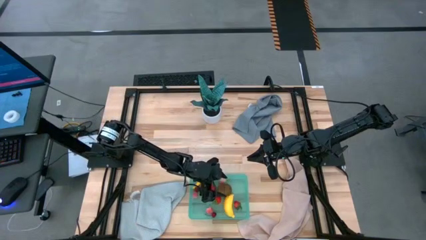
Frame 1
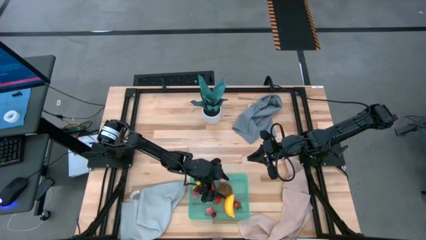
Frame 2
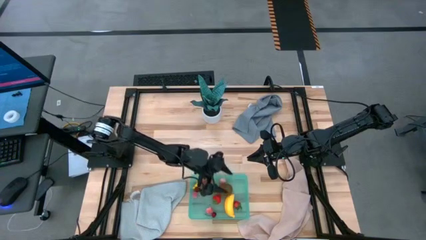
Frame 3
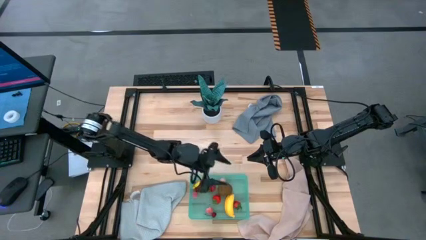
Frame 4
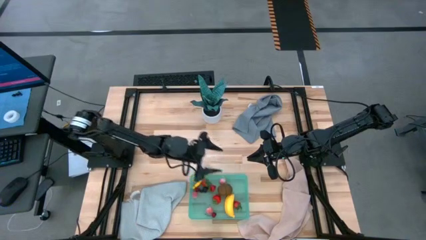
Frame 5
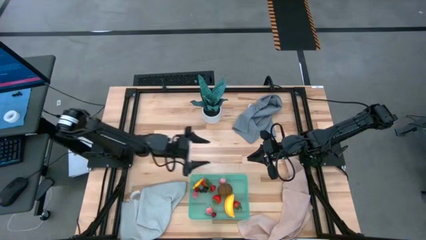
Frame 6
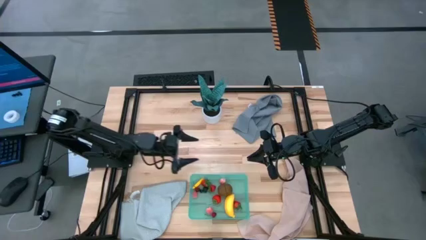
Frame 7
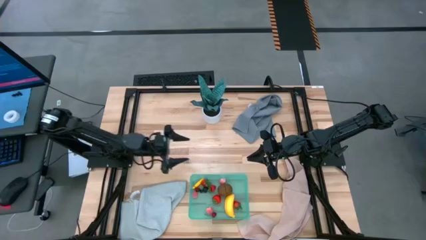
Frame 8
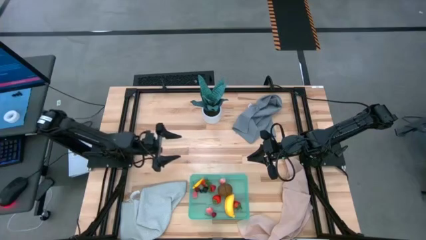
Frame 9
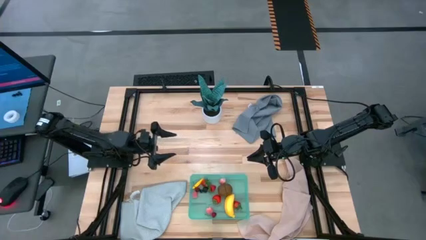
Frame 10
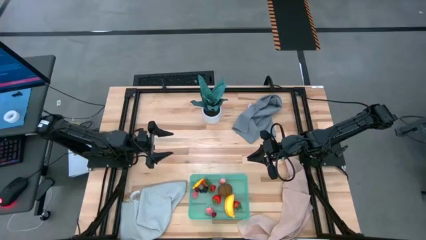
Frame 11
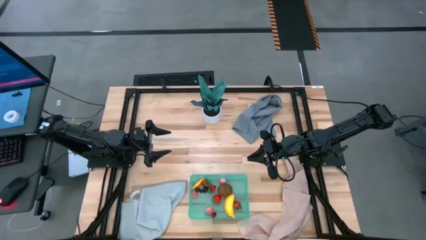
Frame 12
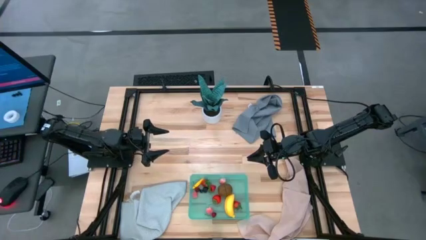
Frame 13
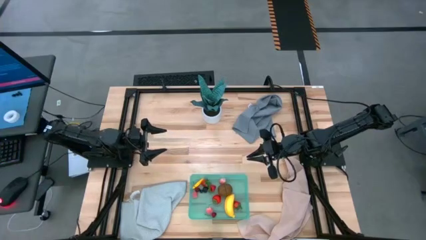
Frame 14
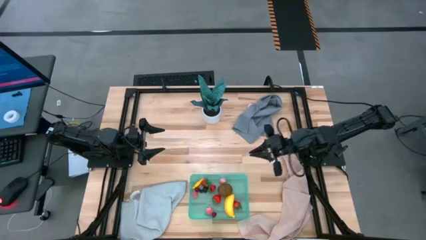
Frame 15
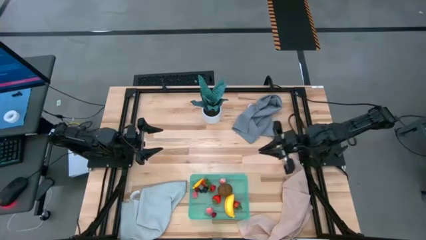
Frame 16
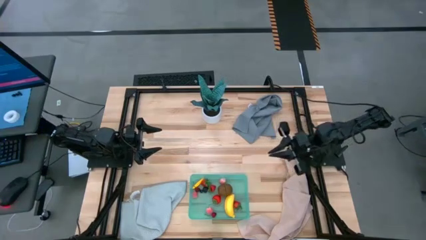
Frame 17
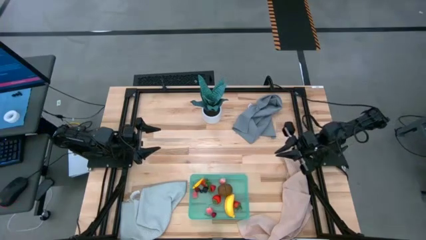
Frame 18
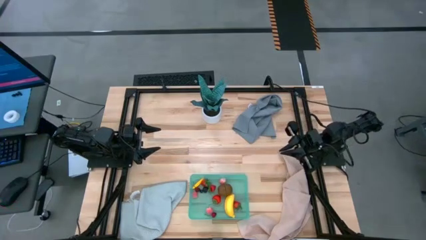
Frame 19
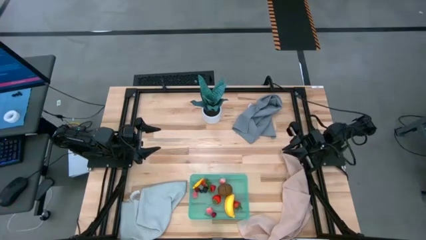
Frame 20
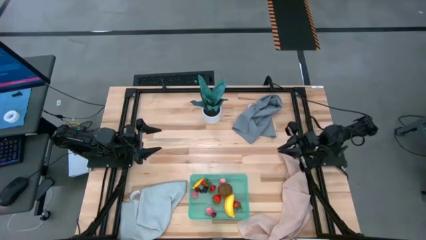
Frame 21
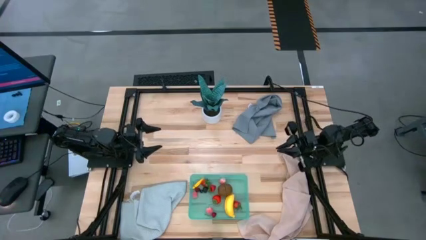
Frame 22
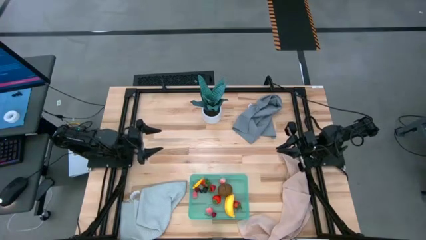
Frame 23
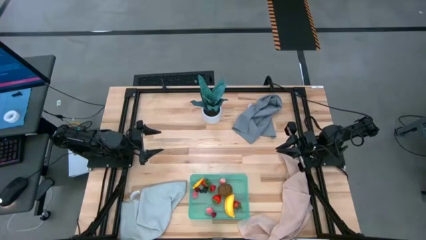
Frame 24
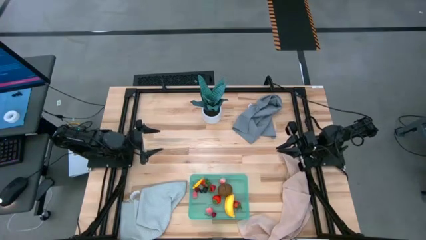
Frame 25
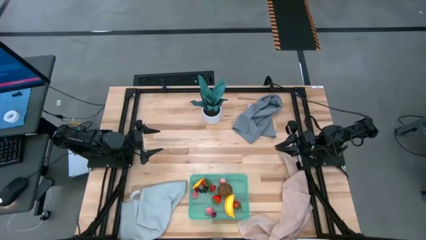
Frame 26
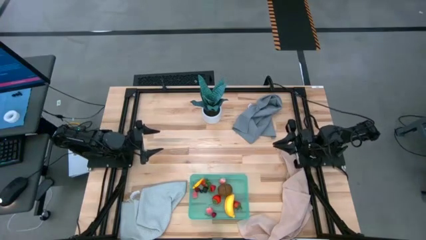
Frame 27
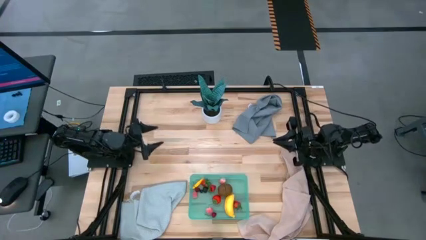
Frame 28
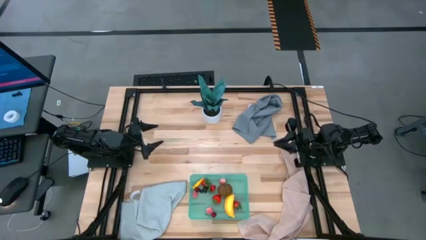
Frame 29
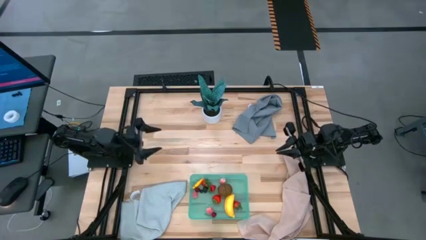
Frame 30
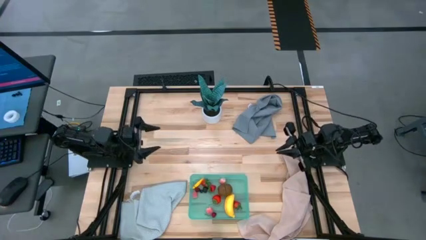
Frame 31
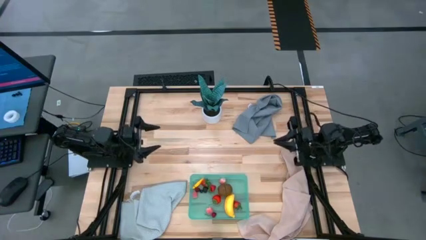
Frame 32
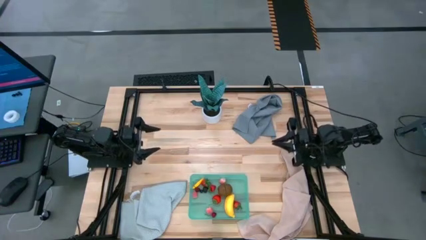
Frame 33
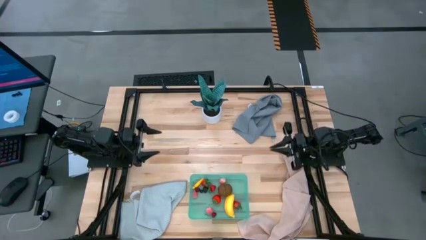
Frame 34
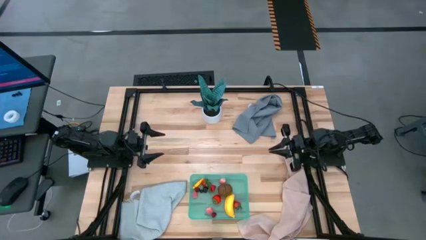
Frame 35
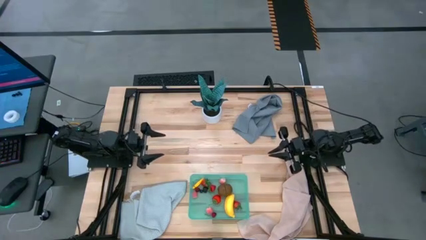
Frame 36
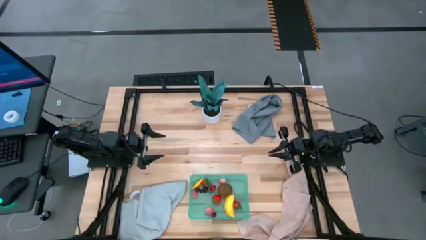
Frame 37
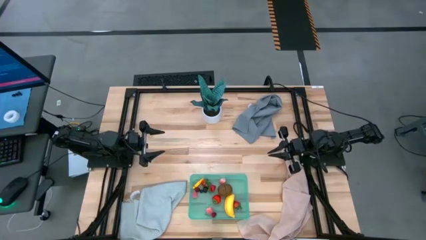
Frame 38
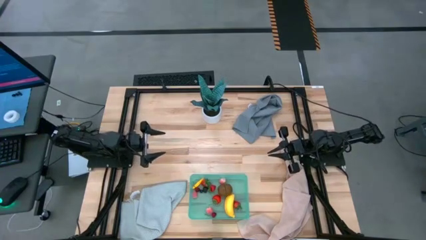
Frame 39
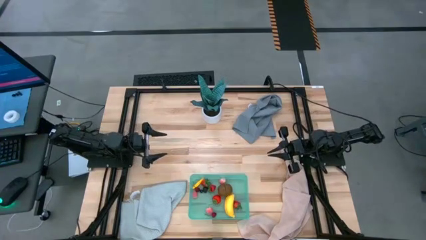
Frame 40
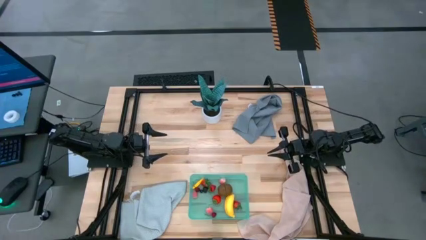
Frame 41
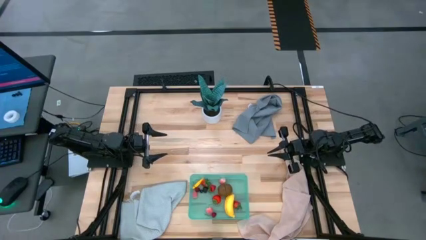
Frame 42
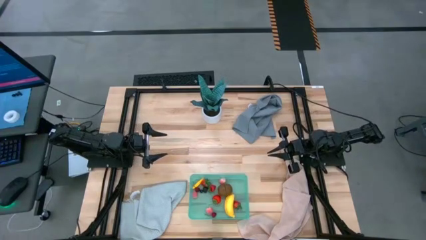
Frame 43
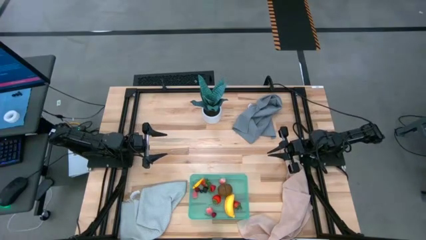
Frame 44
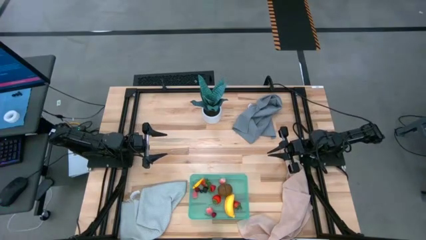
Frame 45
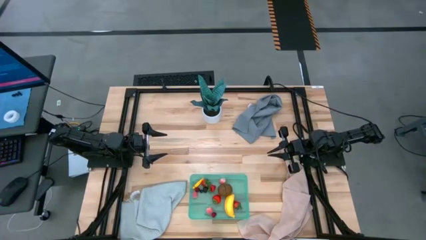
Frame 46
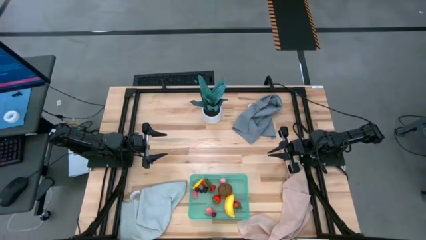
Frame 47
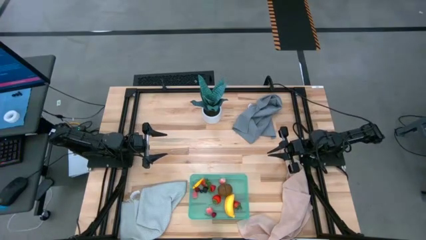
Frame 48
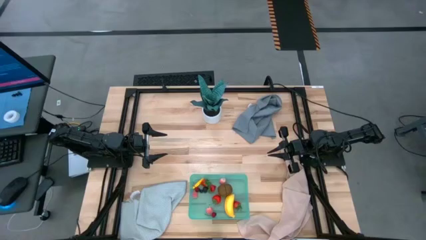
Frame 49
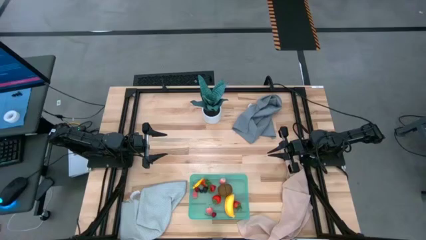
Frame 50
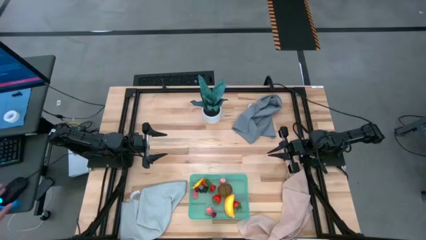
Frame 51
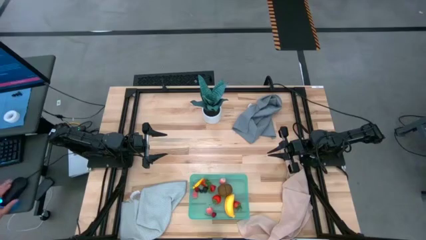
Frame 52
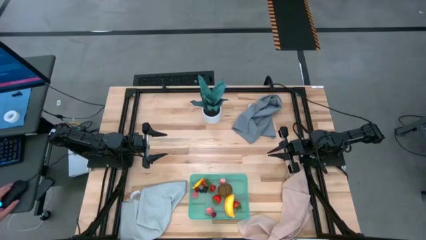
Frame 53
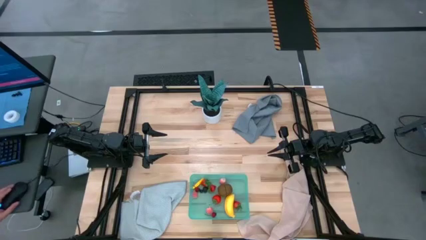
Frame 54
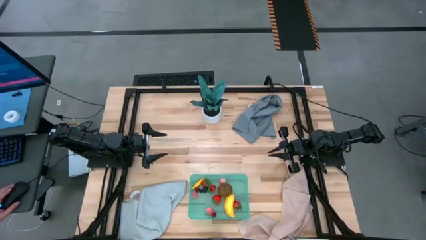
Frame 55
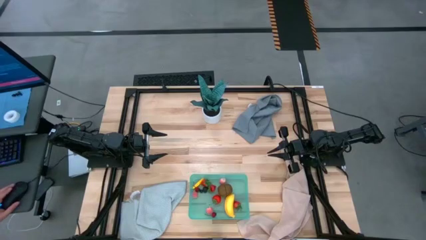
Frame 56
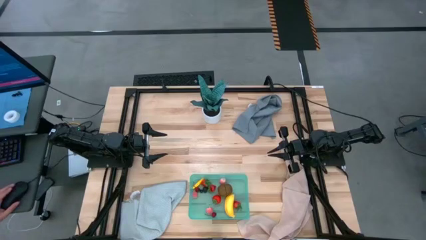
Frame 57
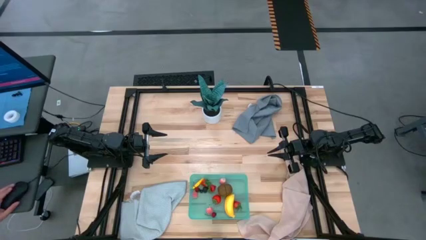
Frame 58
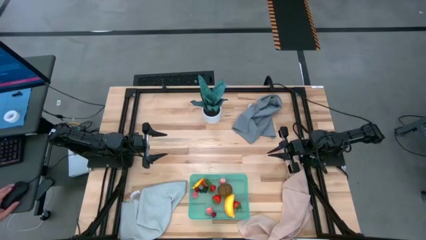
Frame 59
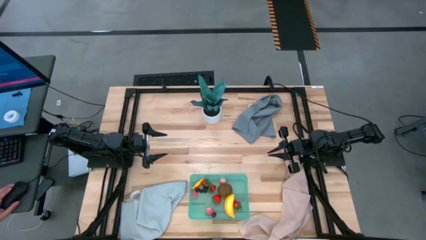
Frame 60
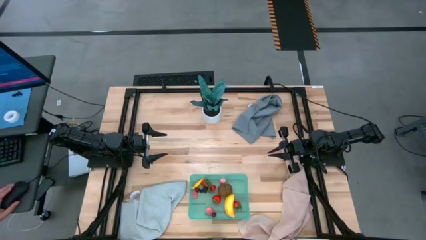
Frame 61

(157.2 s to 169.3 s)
Task: Pick and placing Produce into tupperware
Return to Home Position
